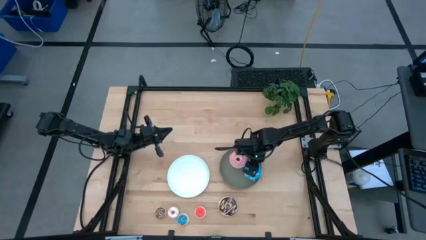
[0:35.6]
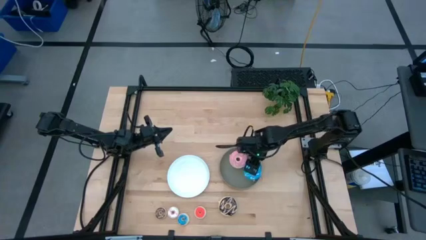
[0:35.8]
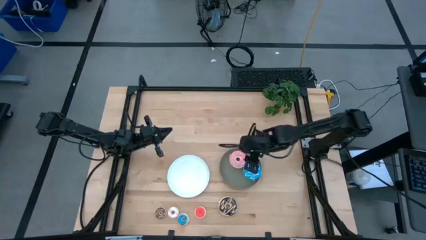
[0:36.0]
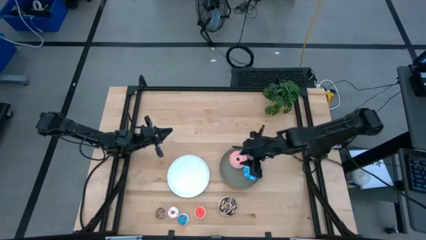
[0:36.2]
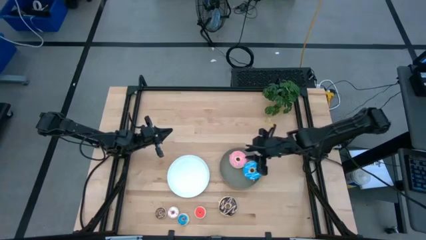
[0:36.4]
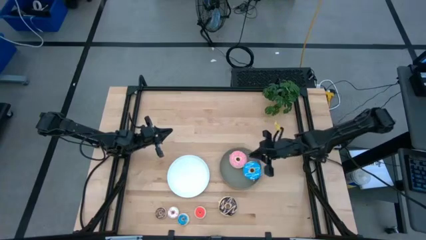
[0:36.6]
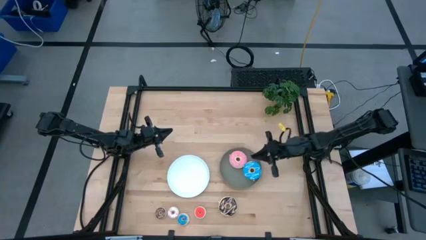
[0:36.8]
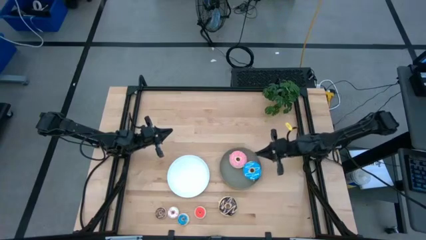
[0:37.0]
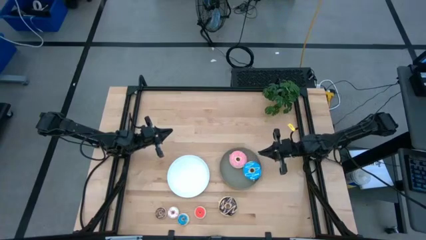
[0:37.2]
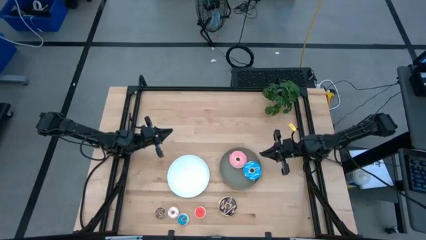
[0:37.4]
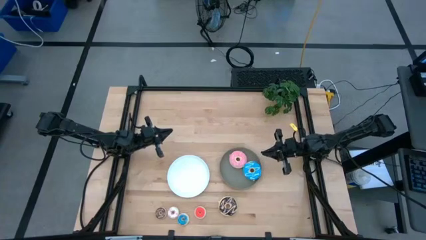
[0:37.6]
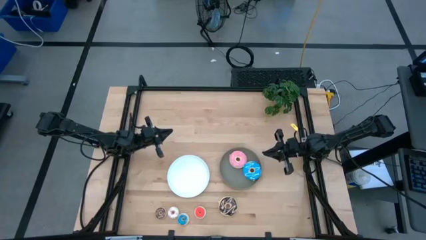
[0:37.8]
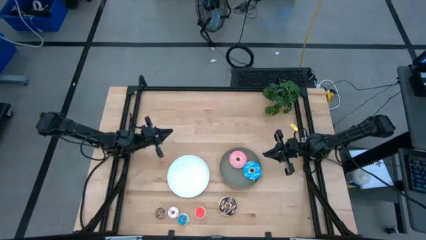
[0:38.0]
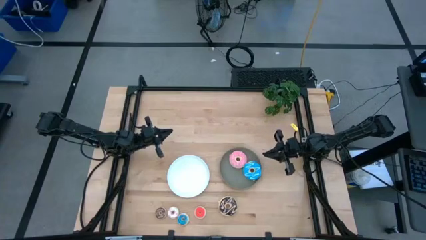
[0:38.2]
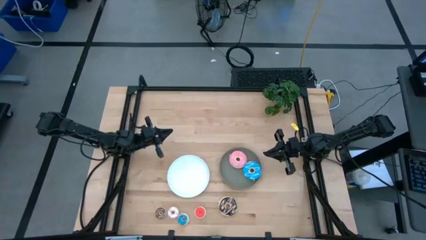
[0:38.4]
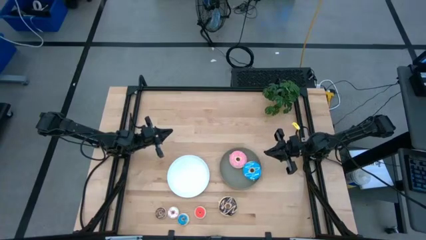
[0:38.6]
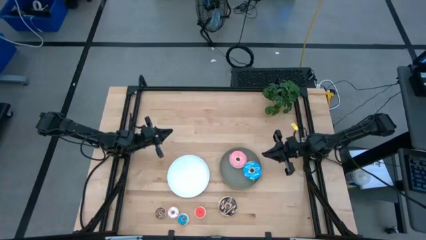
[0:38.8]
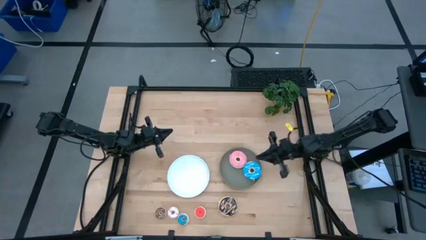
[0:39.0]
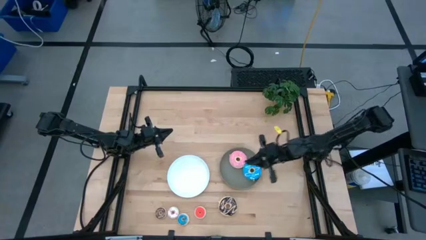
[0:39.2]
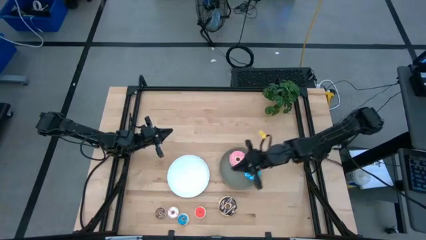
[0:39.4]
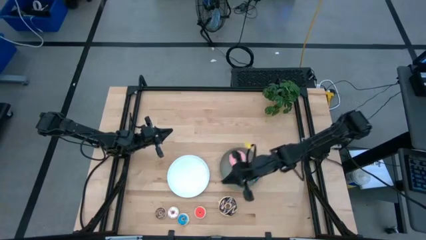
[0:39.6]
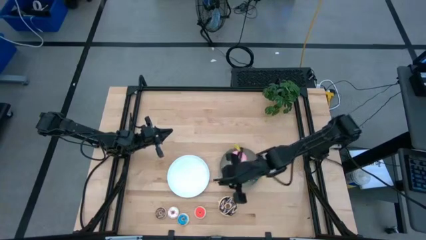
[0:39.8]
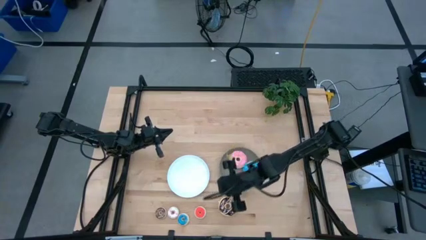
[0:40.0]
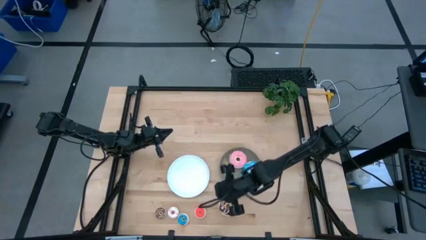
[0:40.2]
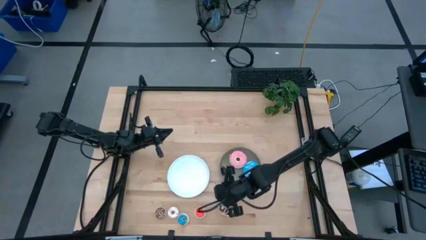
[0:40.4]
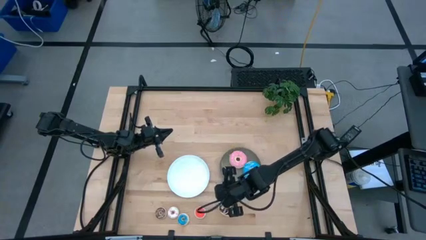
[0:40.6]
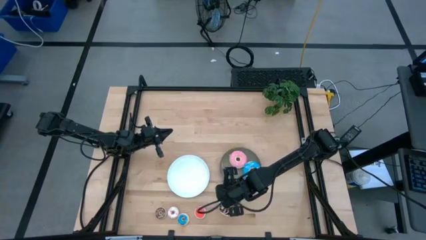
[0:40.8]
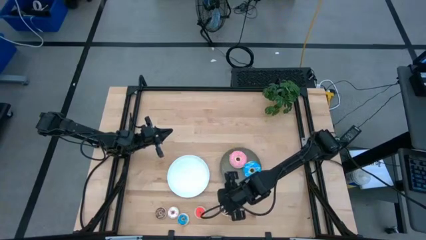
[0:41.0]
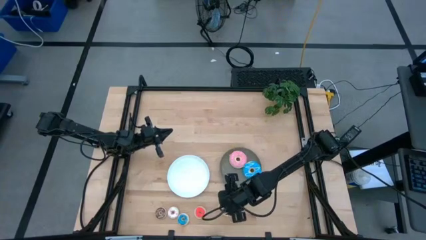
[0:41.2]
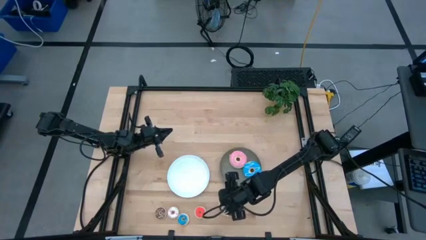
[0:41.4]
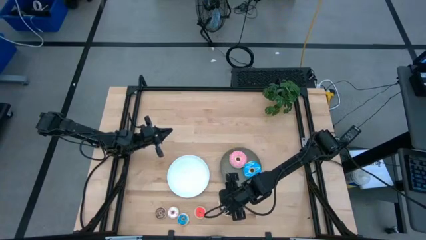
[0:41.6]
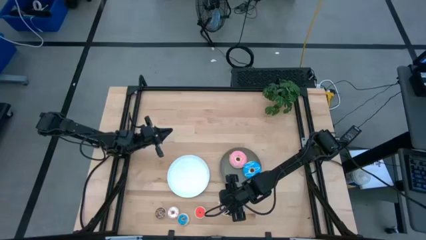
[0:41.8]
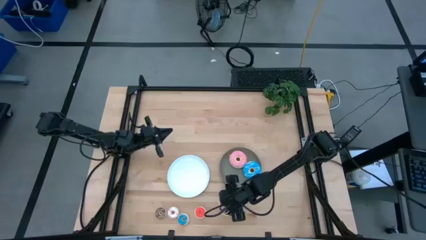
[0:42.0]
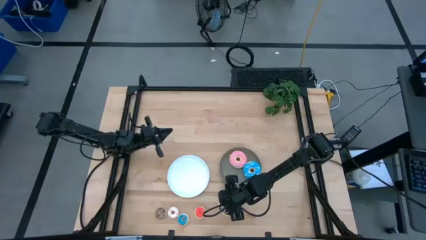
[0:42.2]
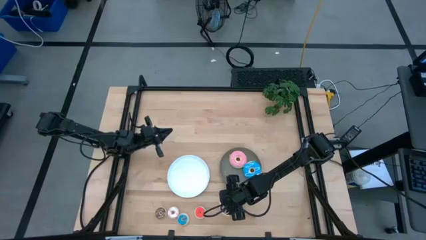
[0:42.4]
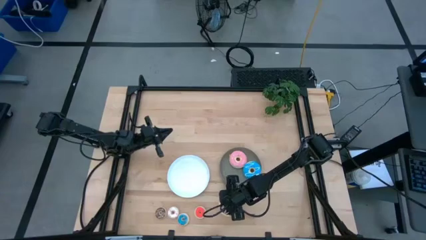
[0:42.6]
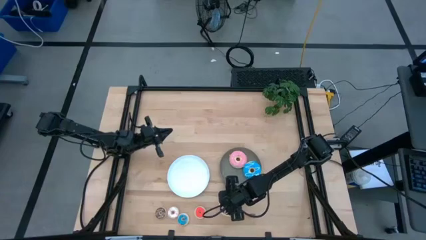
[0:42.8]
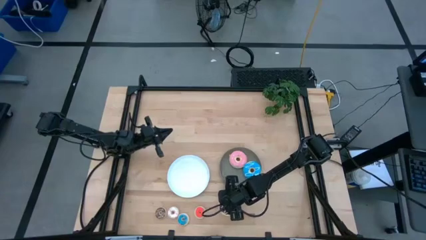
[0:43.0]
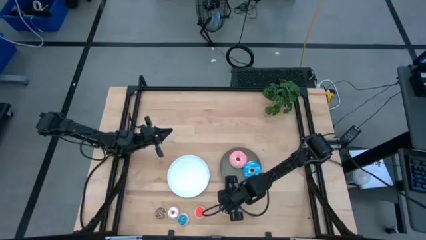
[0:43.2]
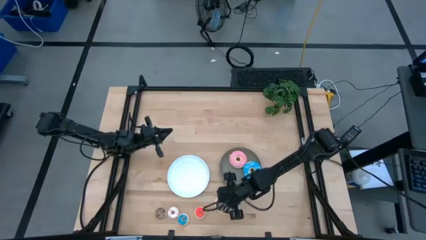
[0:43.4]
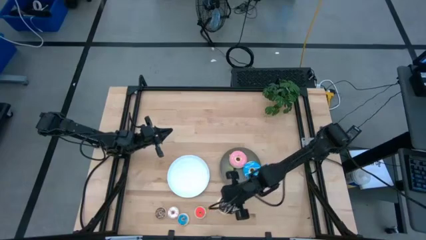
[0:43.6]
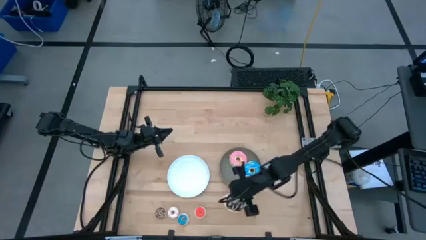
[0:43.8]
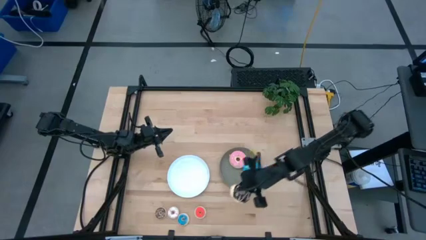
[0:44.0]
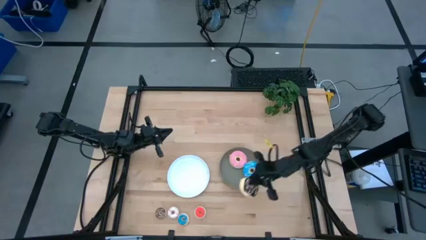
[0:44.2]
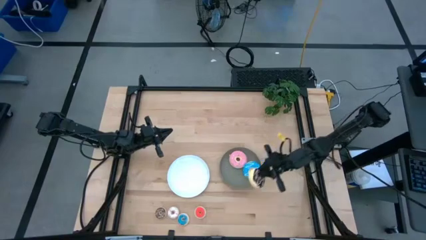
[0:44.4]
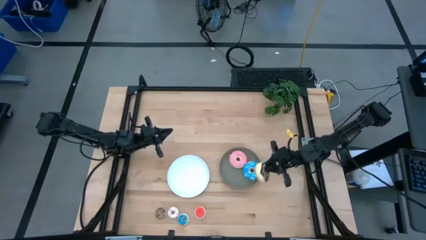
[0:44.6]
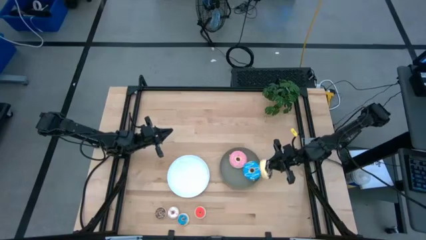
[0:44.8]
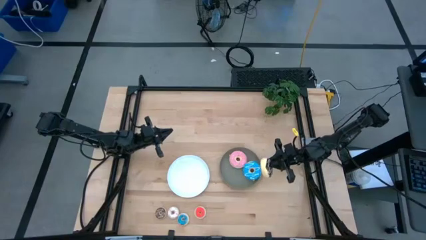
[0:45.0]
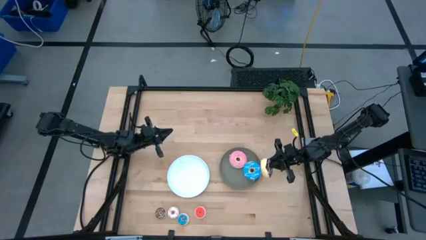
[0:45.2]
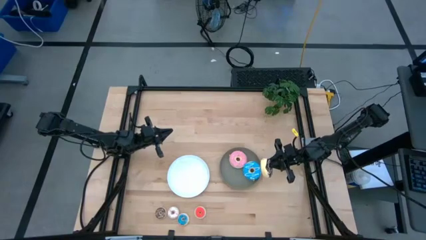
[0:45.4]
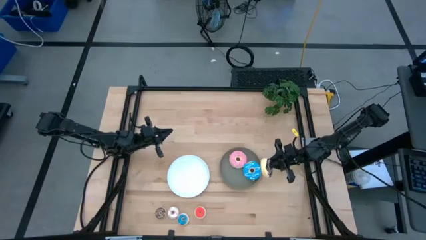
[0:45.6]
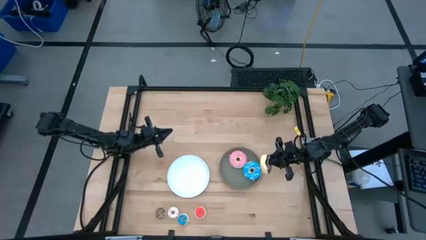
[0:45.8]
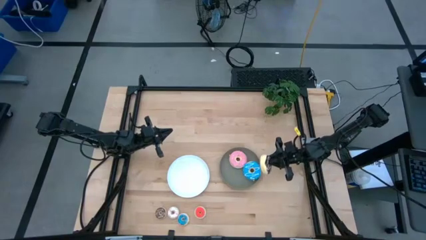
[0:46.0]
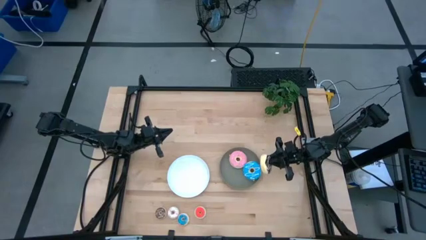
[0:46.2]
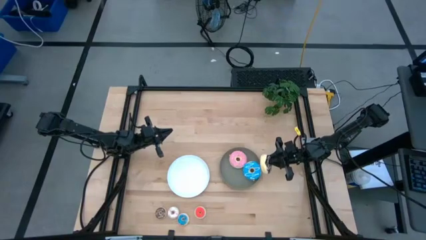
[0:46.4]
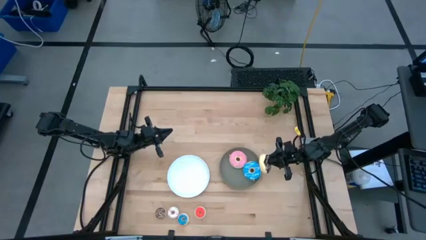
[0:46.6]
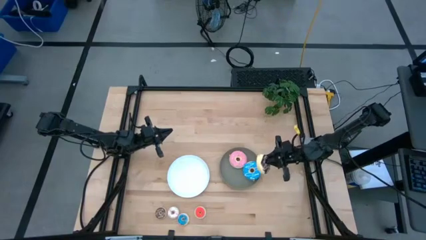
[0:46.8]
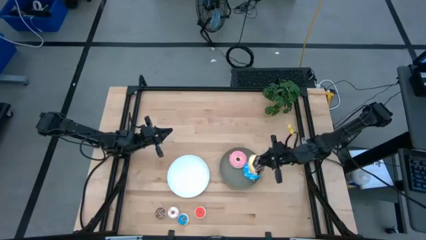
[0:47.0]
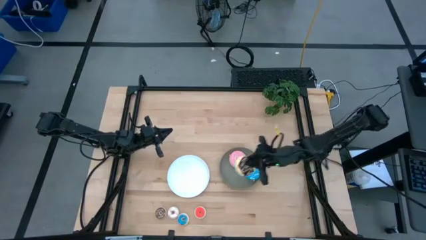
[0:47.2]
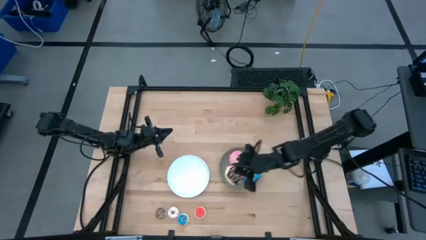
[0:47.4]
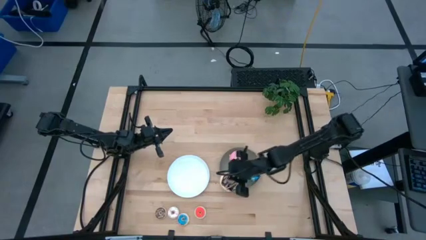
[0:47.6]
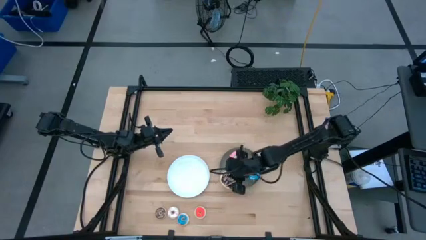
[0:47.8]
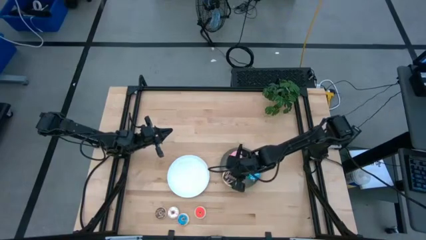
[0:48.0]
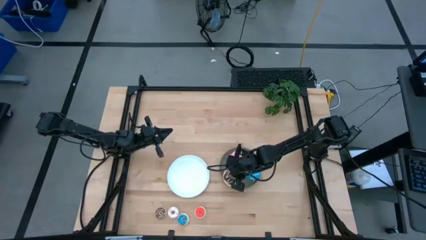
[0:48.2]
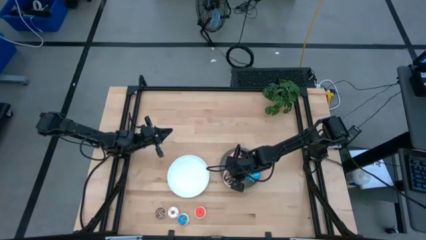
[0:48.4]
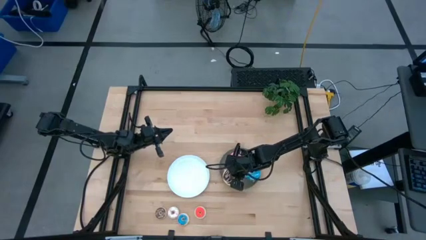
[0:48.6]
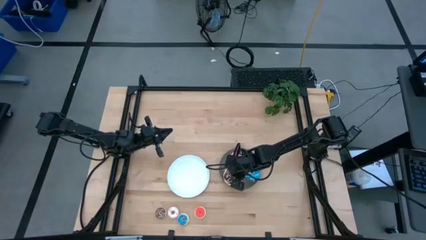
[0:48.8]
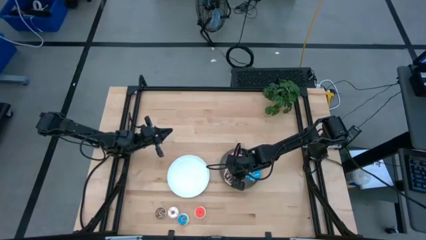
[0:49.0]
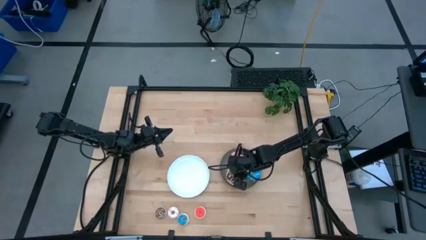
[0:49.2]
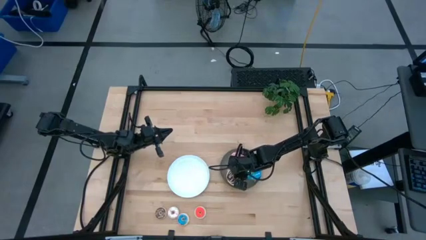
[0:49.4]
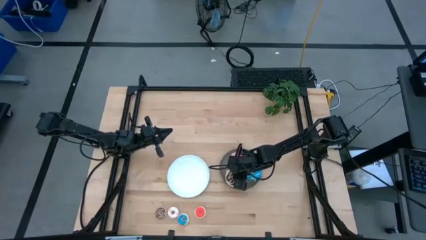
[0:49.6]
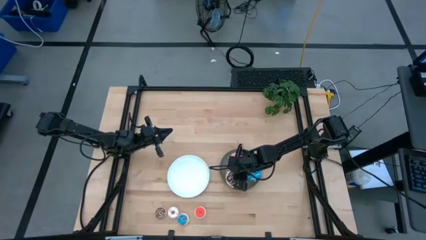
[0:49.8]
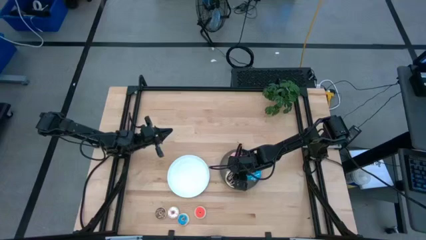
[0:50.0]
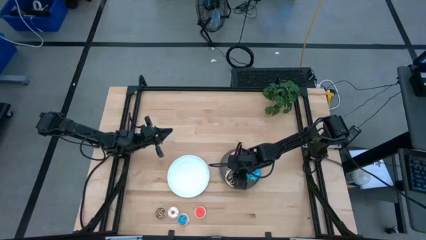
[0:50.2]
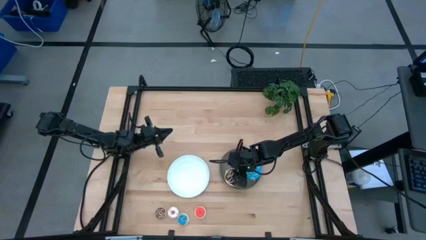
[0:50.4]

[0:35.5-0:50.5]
Task: Pick & Place donuts
Put the large brown donut on the brown plate
